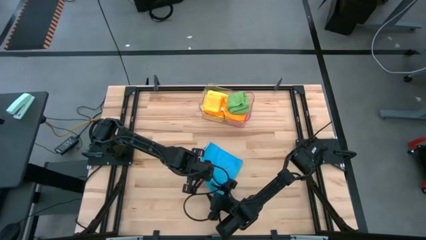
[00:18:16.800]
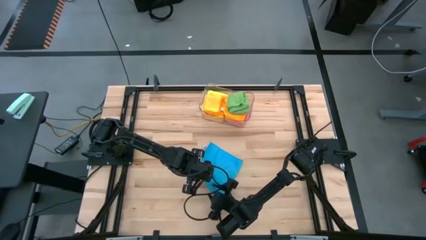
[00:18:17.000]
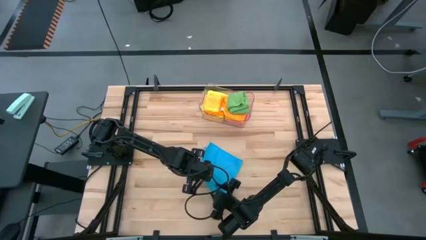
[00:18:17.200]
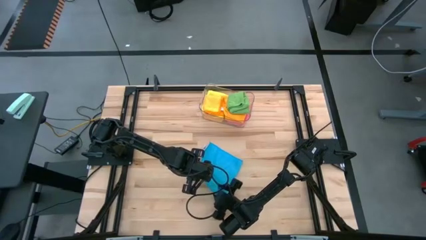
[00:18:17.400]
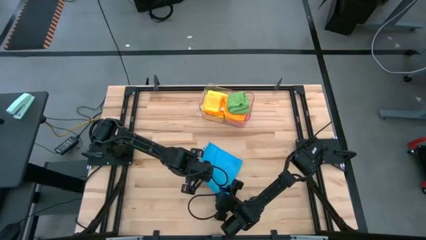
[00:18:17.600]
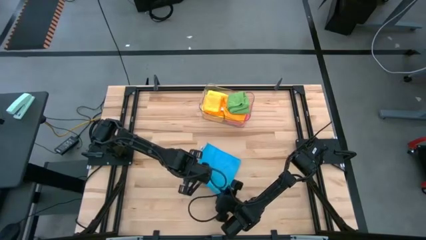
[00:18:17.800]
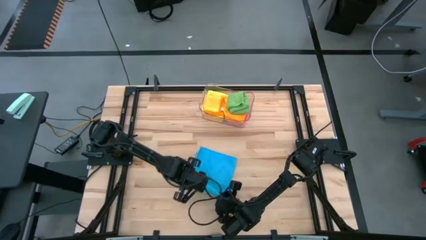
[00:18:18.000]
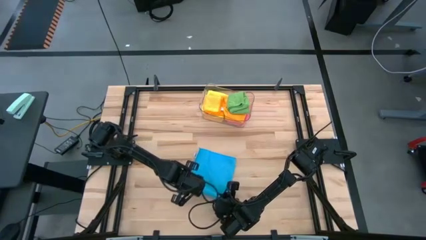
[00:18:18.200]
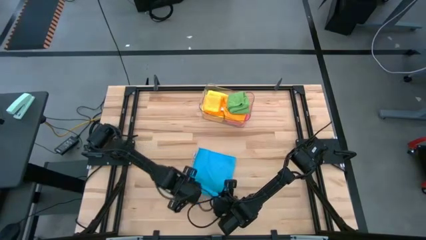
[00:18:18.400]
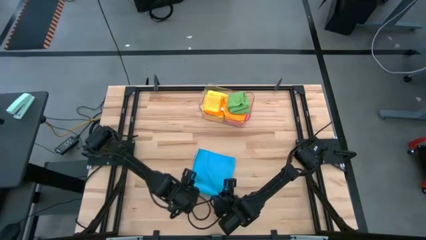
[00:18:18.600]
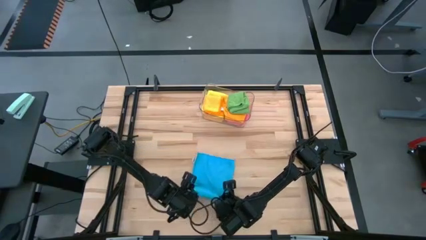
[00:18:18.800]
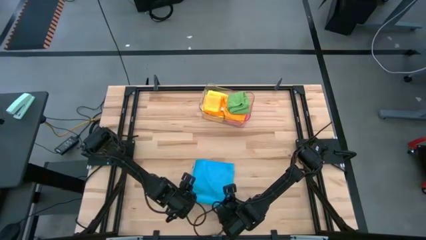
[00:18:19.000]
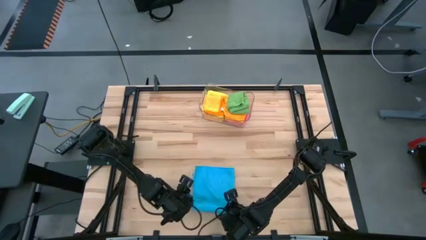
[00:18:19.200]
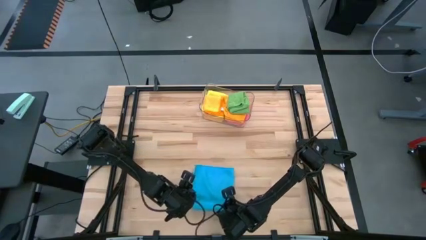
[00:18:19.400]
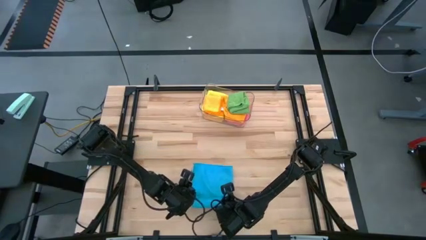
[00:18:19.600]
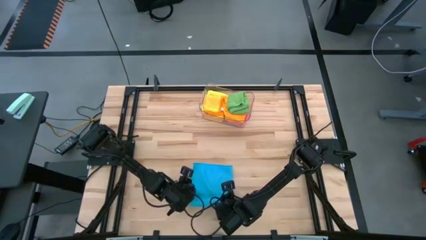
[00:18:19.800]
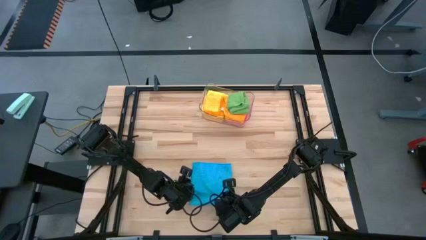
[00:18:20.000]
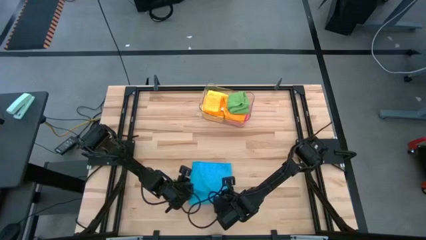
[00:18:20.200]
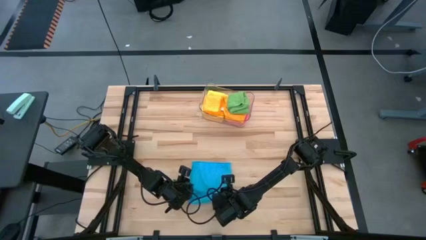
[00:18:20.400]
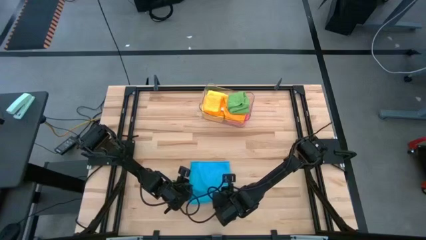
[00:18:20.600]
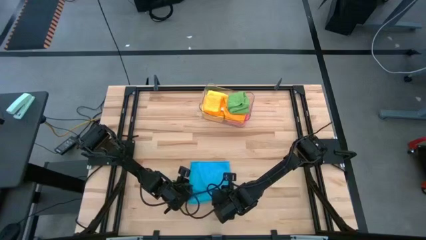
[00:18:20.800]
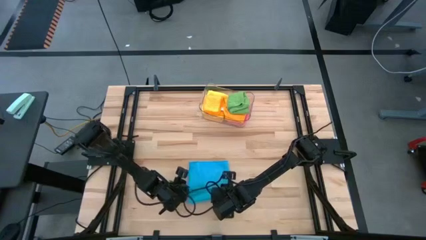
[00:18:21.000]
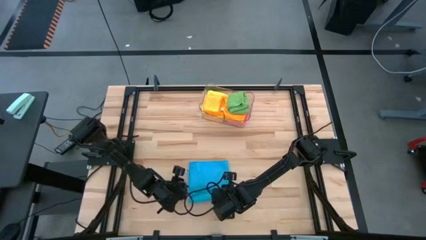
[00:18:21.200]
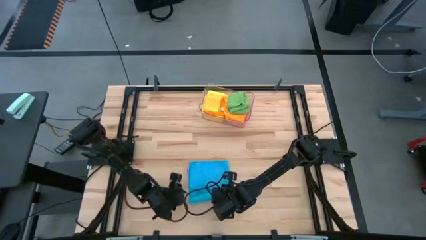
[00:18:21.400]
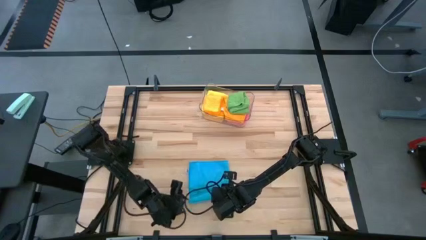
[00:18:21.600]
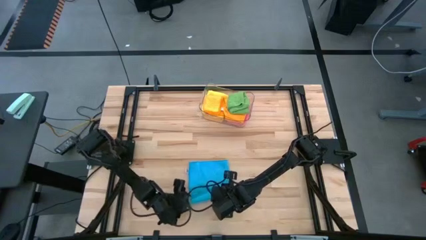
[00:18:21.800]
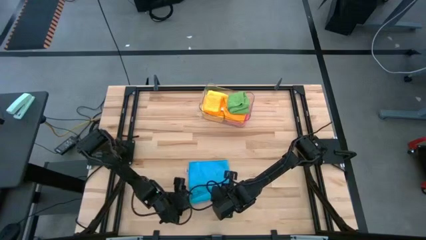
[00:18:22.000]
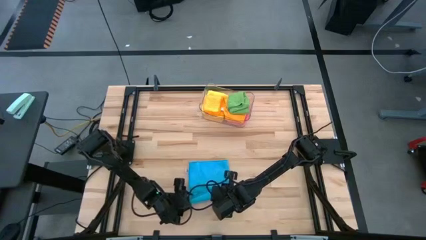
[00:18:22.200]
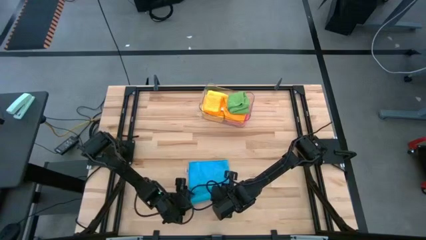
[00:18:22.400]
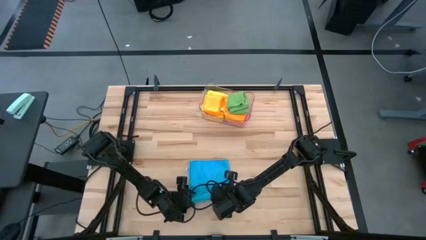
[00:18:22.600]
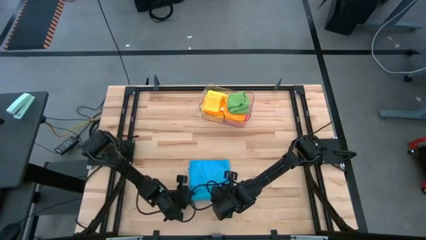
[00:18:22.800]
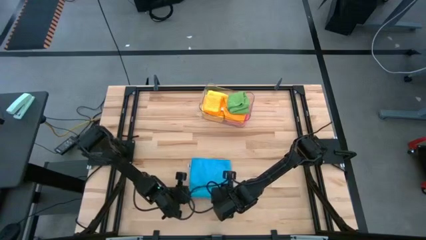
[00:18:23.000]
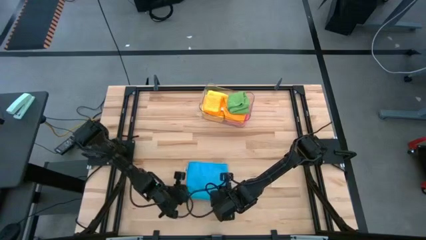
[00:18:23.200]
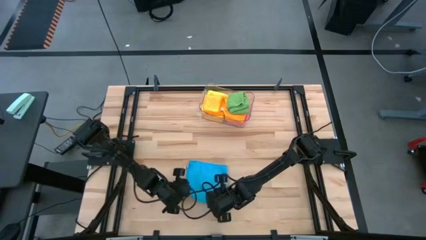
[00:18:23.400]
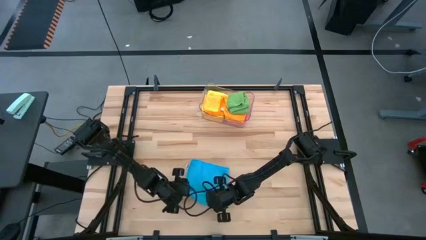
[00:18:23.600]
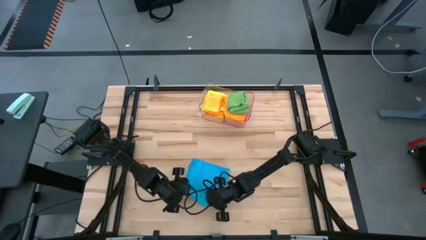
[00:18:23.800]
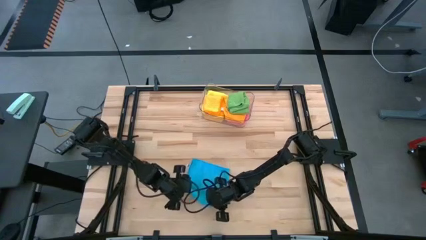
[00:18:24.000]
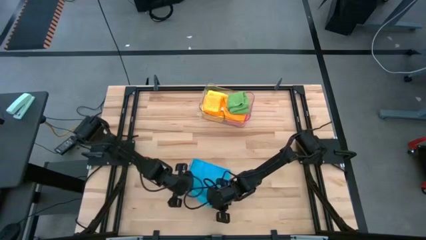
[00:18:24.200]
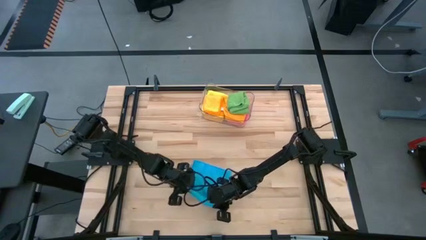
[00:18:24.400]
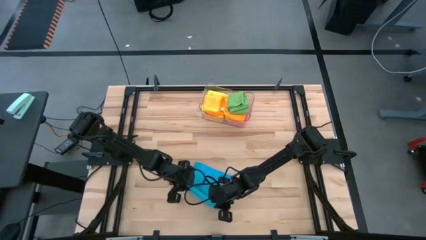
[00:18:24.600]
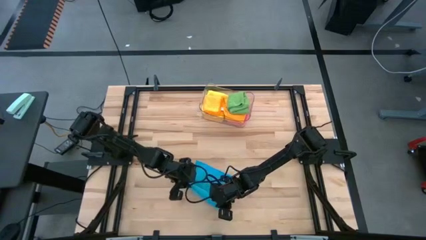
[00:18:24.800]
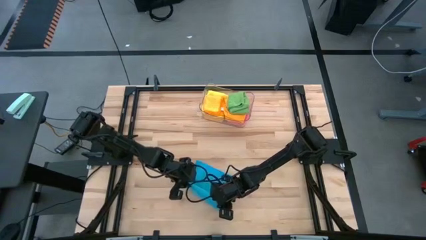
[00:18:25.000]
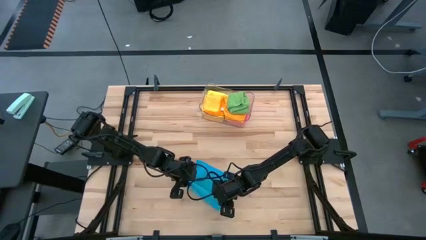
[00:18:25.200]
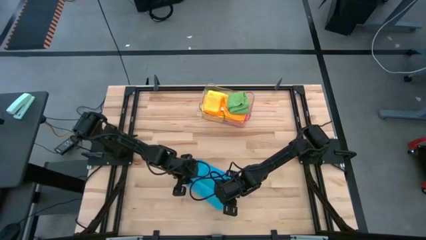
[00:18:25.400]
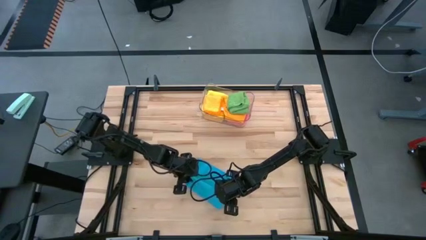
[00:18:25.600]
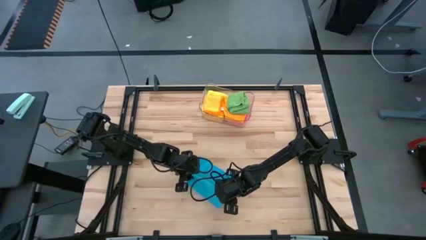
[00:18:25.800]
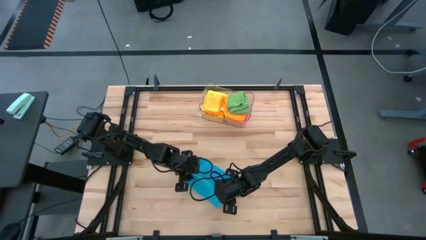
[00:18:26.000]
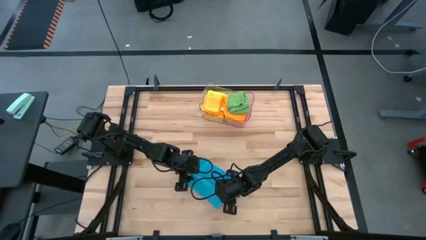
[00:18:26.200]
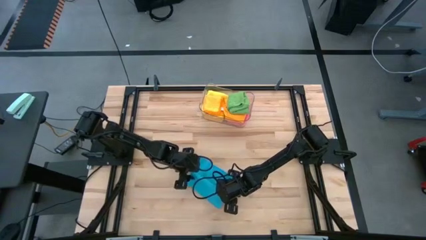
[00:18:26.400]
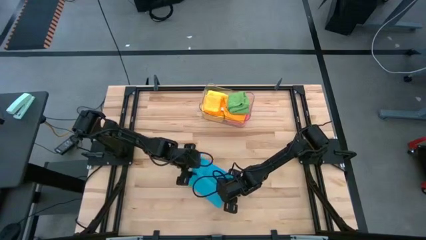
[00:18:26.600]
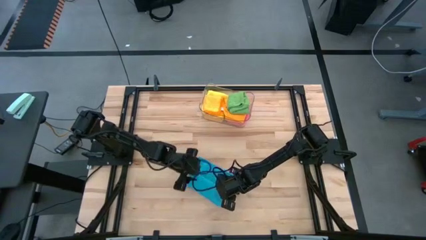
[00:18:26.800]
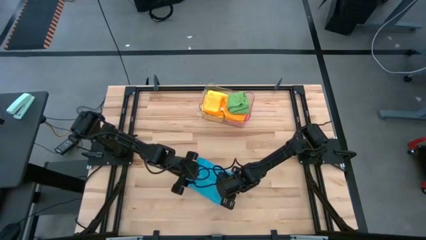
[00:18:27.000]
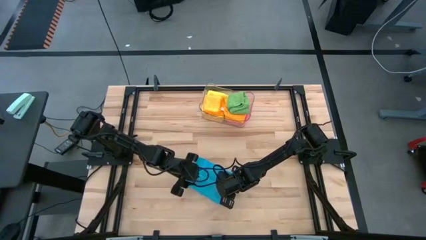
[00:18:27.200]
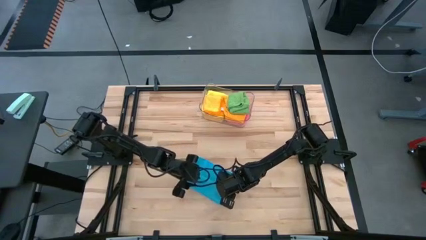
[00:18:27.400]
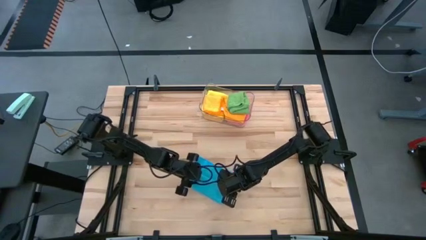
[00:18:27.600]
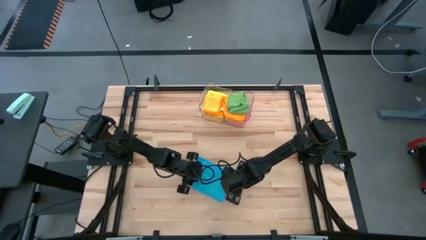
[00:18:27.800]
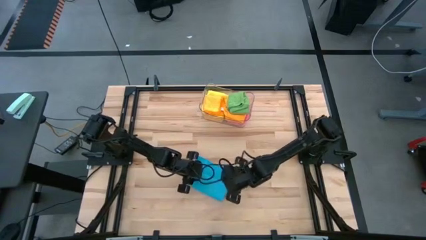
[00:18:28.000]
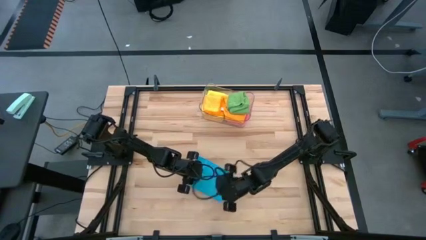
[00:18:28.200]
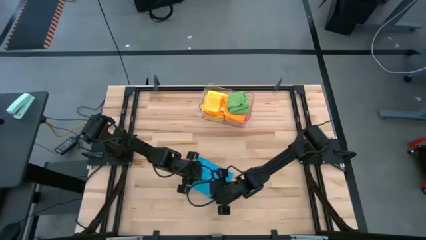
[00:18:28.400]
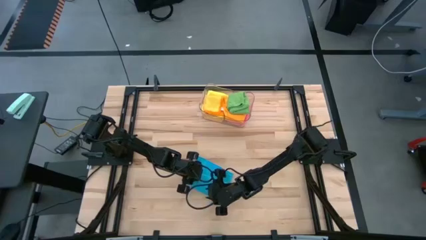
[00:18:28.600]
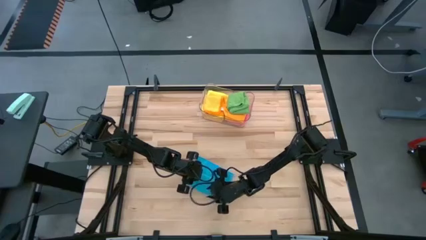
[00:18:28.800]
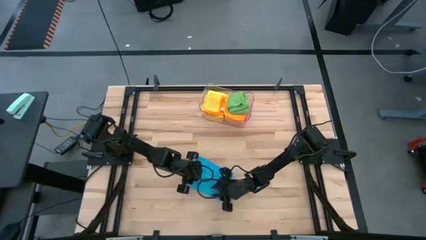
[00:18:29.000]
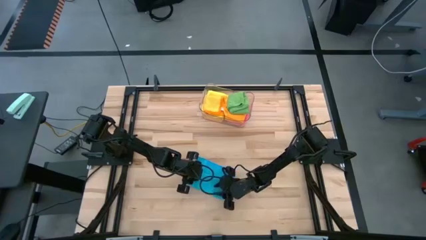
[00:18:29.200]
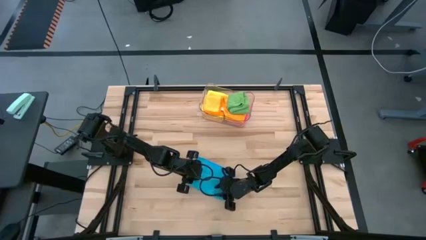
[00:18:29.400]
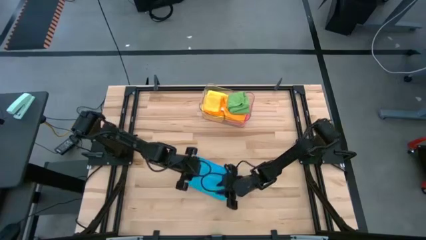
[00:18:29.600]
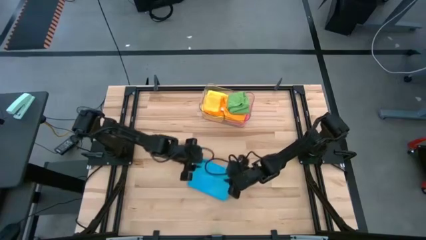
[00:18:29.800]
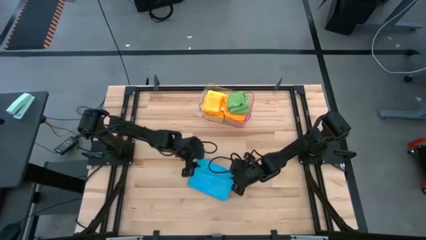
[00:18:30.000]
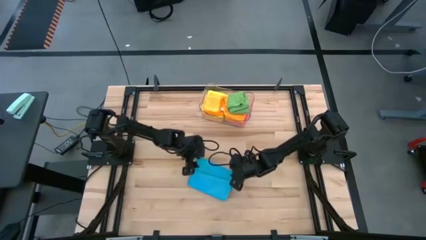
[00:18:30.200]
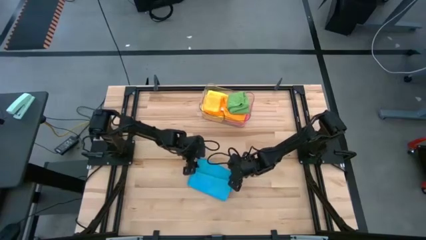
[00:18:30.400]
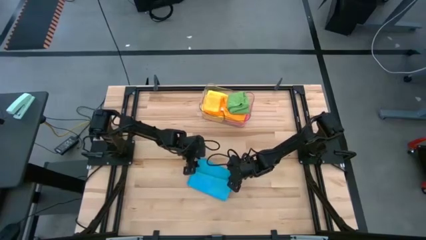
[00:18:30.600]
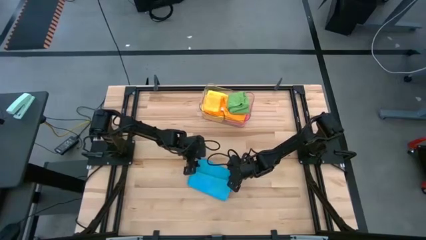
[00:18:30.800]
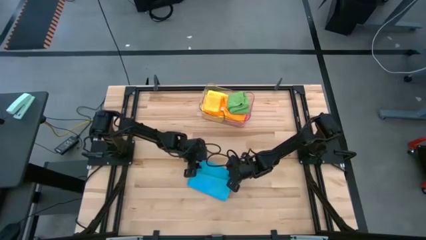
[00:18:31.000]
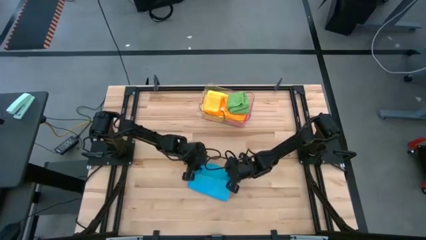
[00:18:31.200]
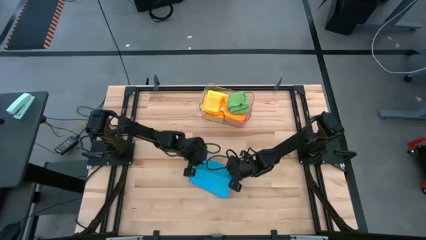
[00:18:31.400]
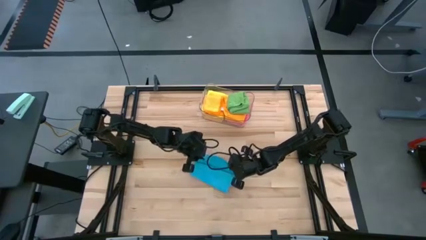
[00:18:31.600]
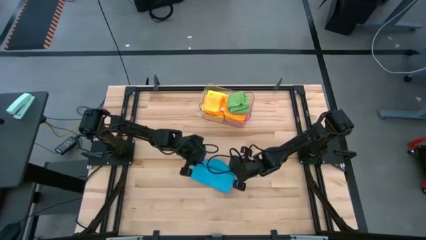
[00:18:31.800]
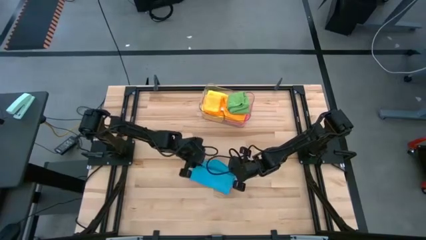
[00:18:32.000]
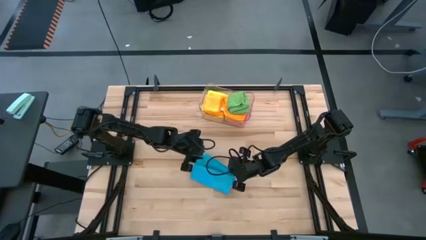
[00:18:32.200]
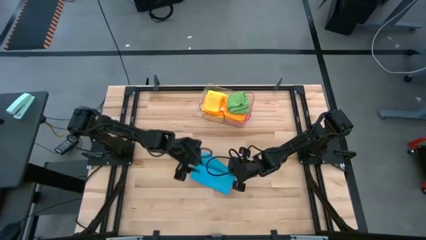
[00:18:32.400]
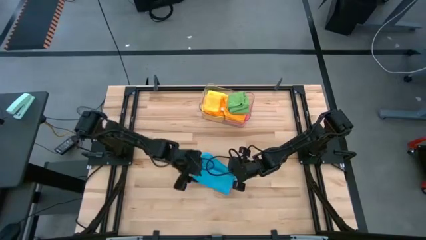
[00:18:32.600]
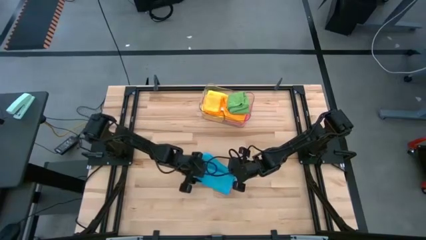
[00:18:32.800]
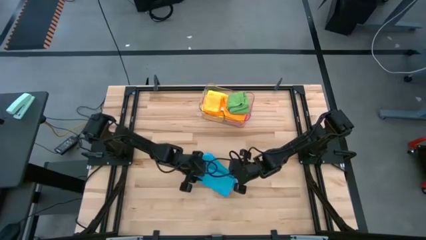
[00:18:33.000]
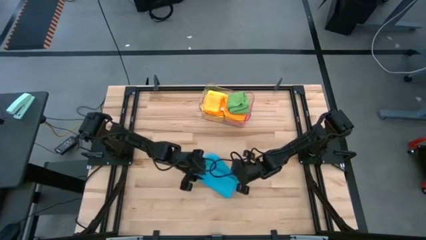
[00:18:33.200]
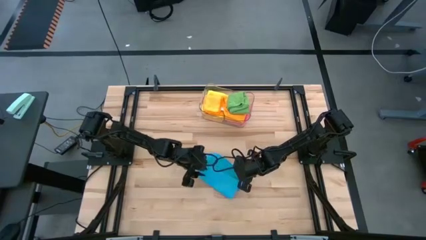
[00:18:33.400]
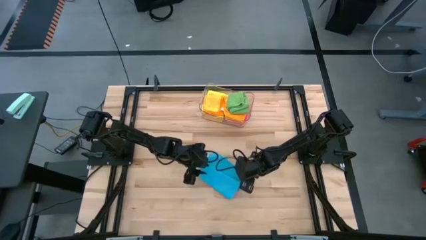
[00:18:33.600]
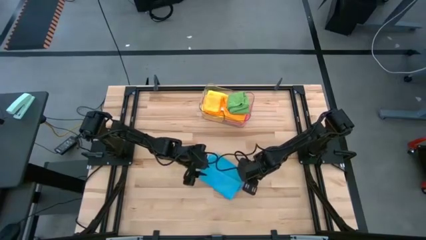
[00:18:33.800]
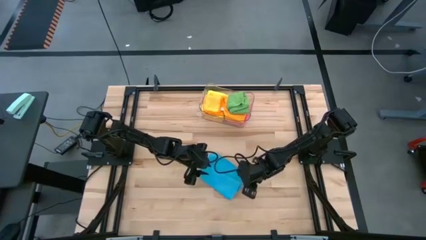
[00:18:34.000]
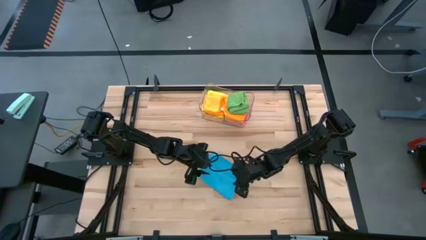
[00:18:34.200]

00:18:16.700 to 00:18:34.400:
Task: Fold microfiber towels
Fold the blue microfiber cloth
